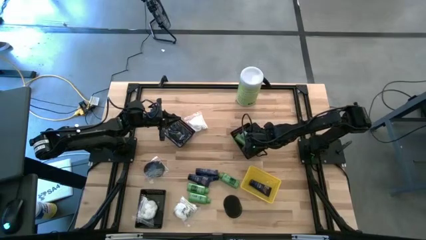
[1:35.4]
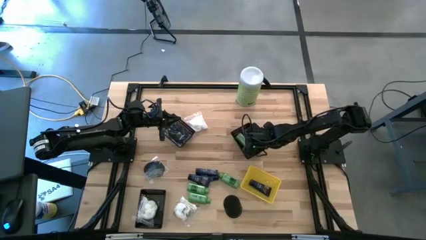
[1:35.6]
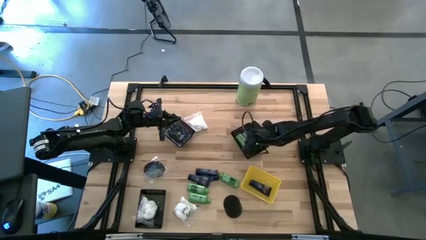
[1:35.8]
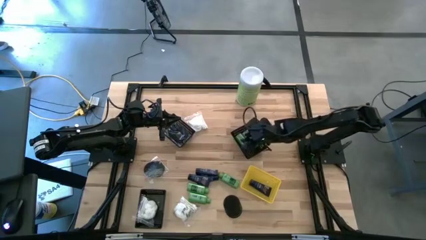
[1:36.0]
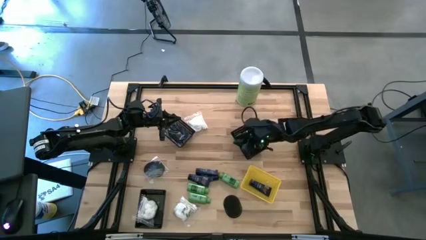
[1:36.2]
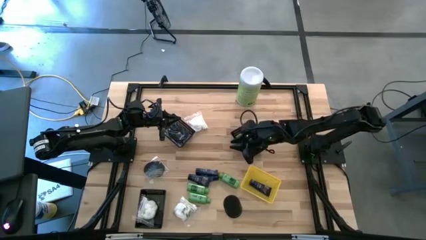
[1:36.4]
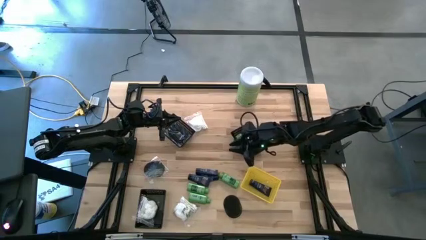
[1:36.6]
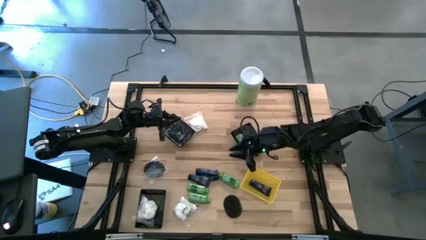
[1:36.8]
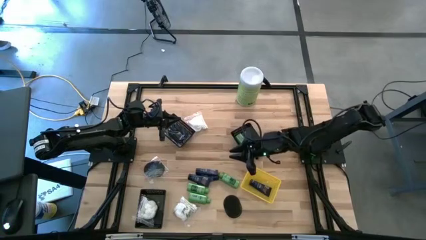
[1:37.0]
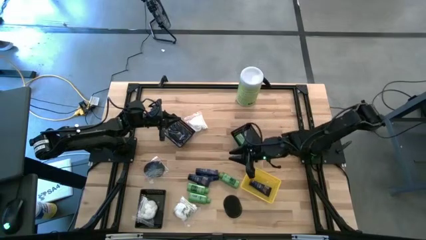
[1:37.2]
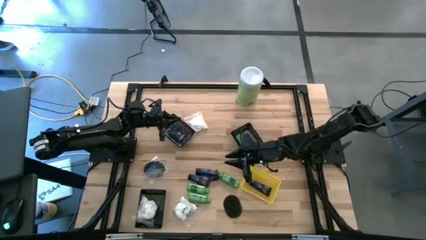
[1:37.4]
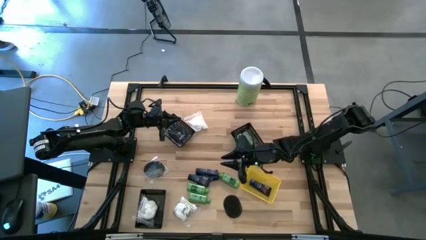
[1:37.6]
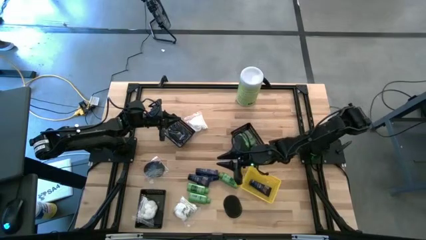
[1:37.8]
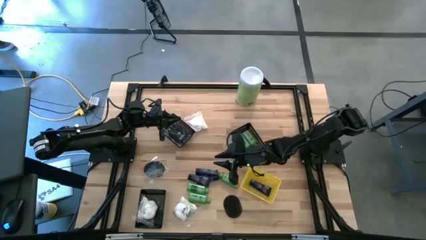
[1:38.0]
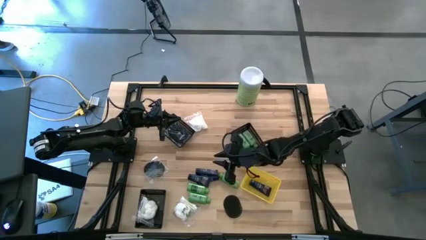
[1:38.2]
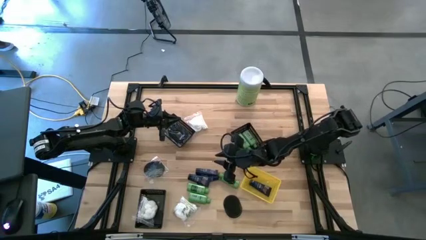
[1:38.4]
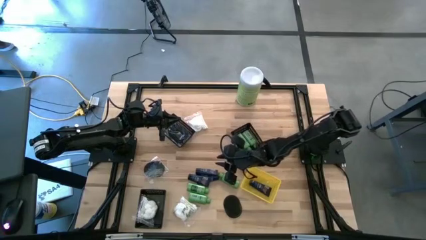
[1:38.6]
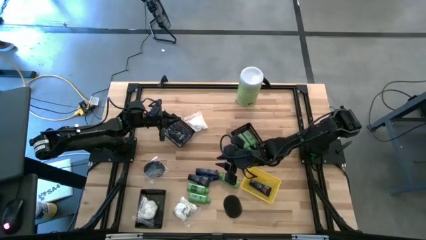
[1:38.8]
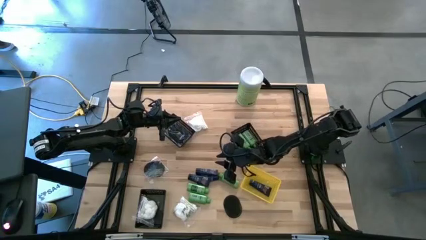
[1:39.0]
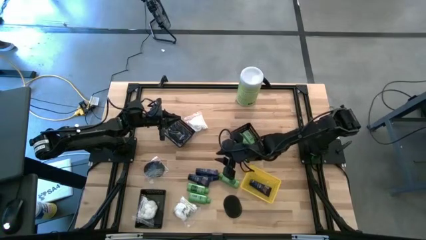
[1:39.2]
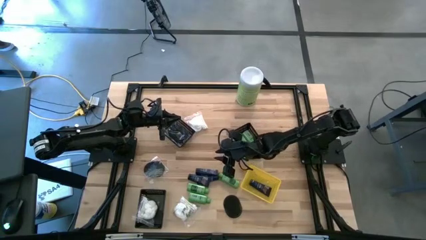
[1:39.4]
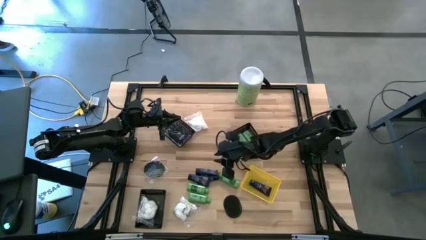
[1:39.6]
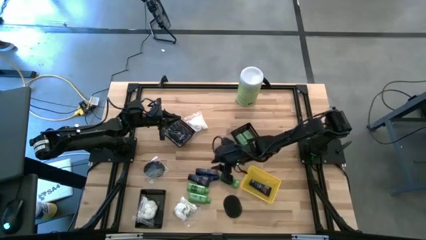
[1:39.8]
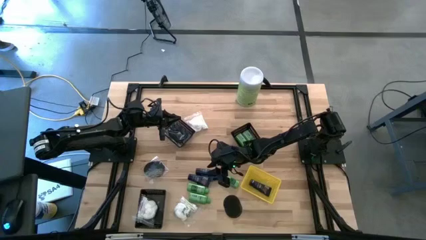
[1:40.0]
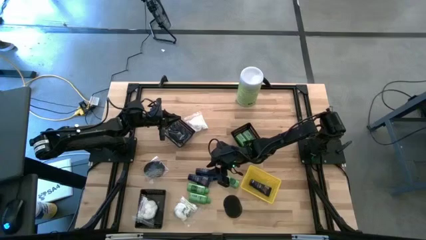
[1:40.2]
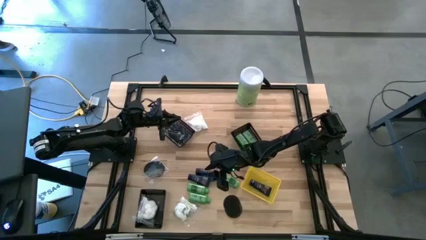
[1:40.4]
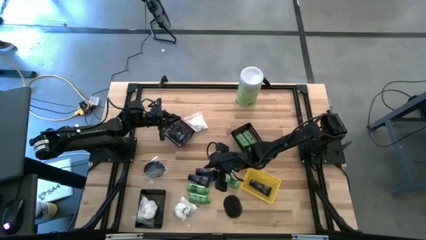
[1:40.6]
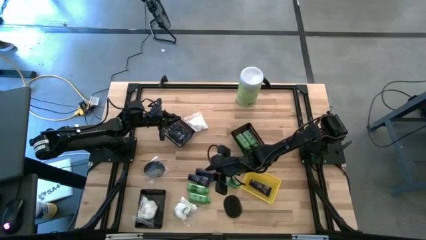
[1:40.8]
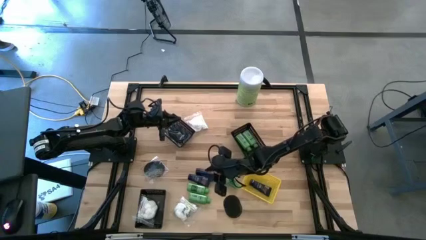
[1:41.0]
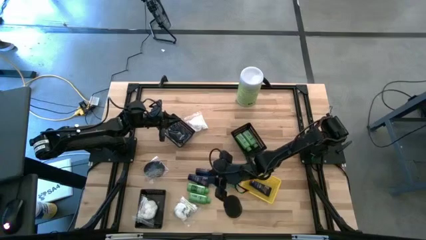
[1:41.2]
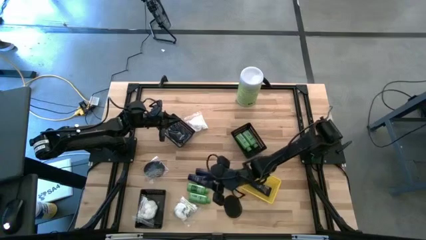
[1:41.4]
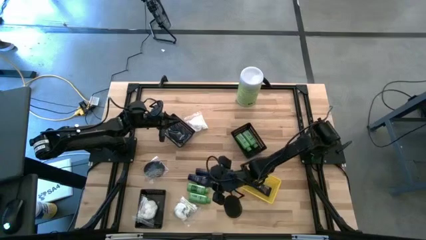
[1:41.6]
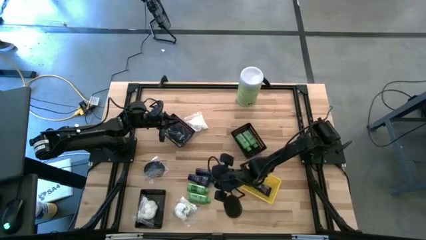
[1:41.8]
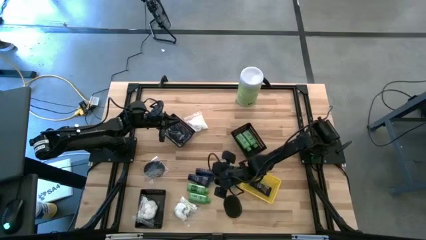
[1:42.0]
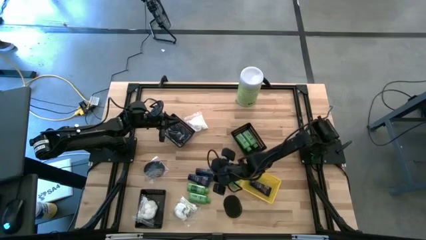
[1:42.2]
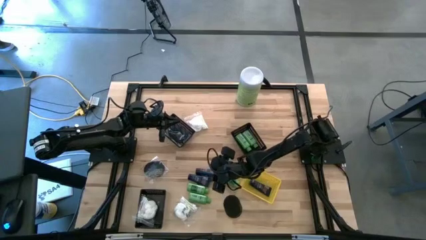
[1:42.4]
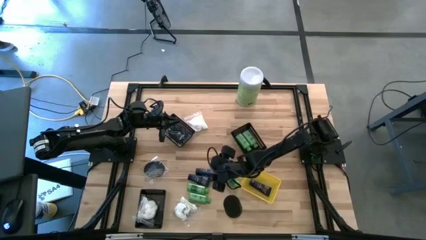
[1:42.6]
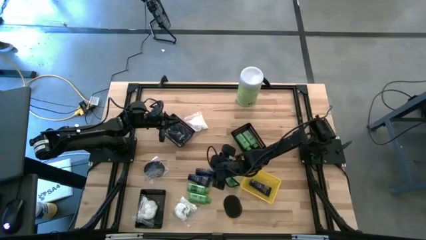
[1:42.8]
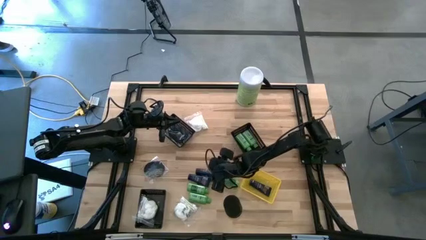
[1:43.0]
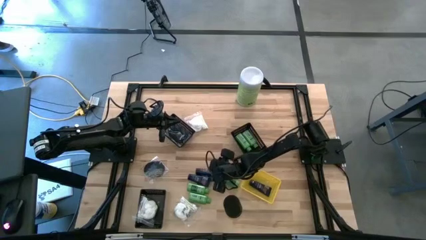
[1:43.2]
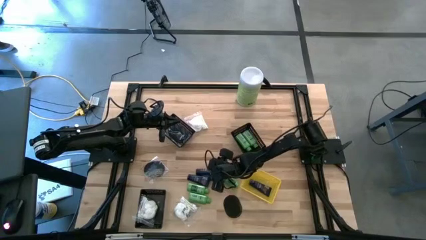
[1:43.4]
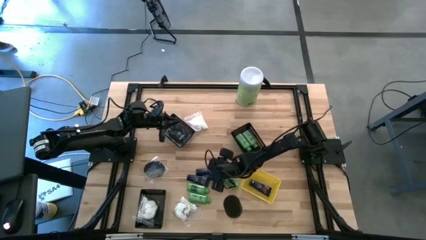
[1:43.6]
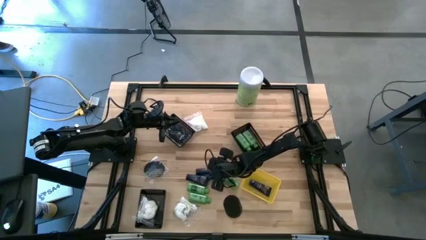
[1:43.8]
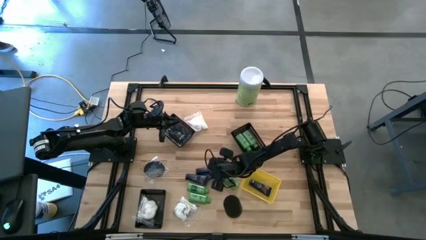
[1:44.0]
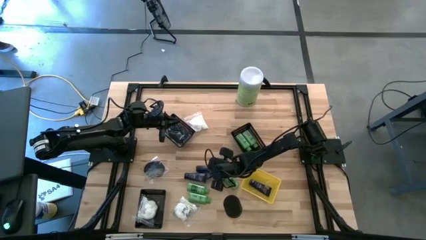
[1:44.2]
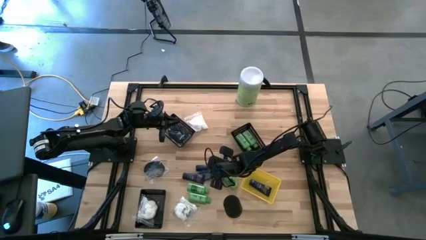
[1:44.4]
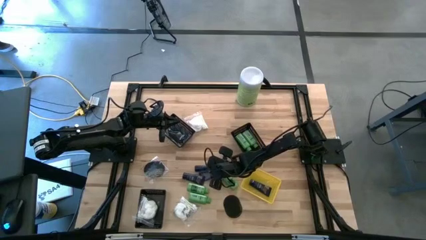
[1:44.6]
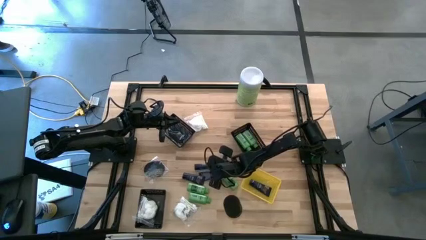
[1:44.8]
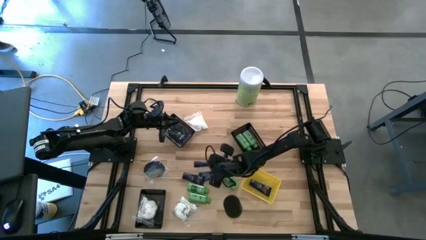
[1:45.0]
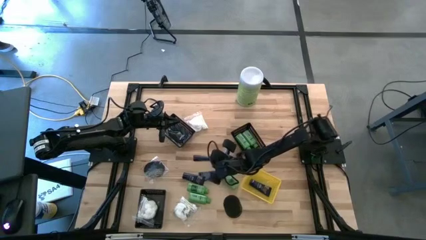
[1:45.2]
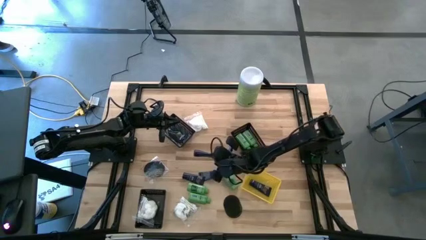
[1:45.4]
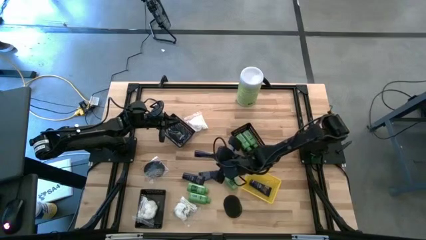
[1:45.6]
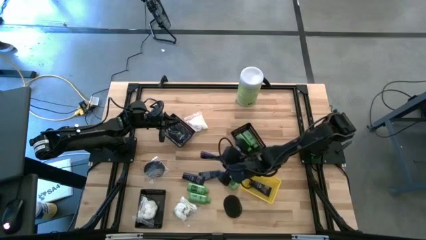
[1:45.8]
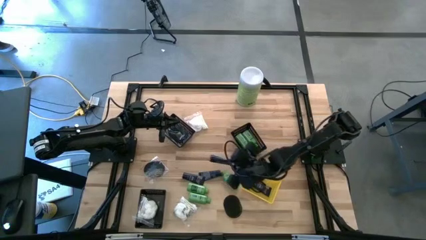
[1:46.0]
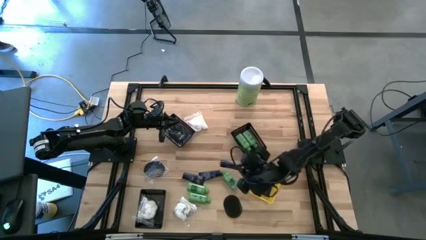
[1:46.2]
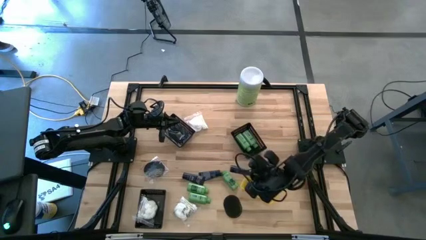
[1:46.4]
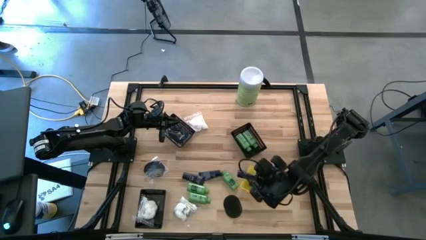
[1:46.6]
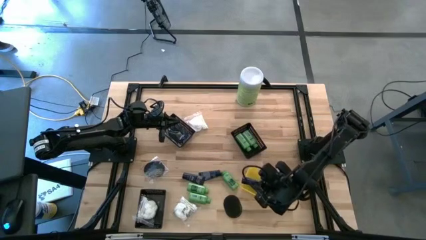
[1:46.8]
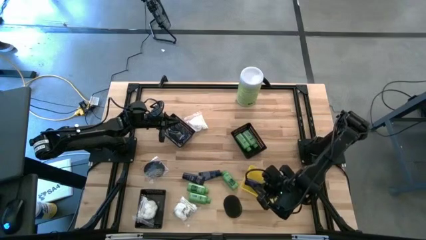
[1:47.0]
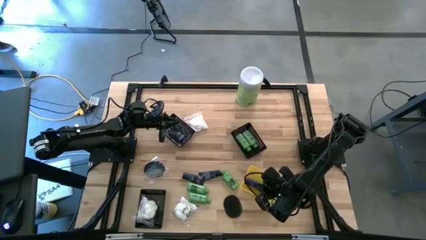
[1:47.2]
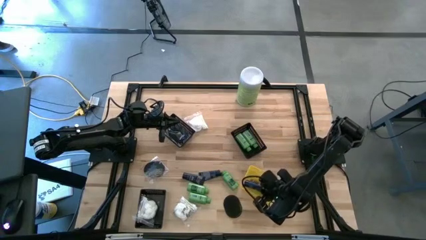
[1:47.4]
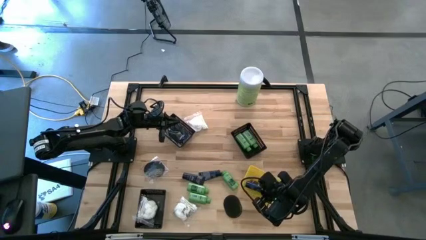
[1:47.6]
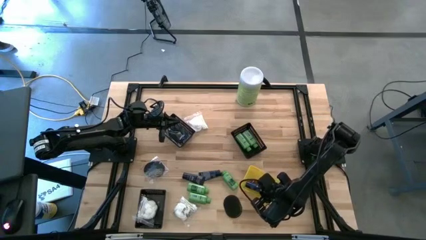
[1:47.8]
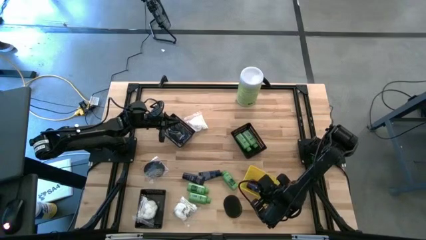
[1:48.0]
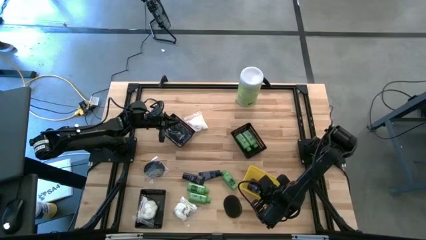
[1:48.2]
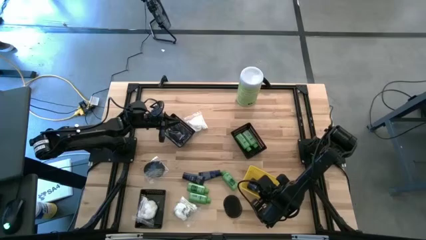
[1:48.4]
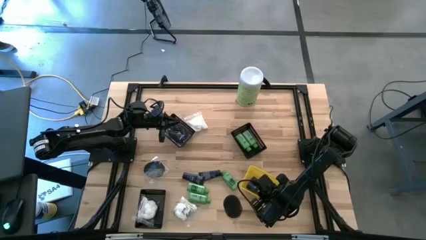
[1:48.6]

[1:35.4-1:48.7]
Task: Pick & Place Travel size toiletries
Put the shaving cream tube into the yellow bin

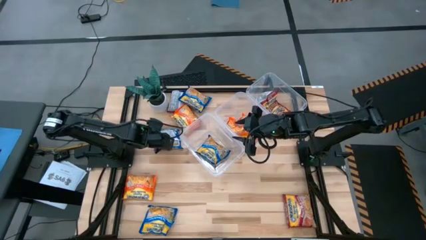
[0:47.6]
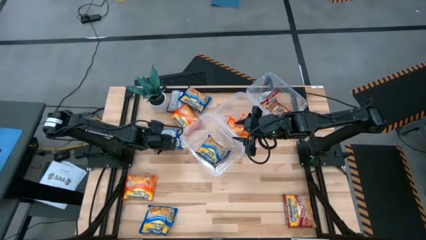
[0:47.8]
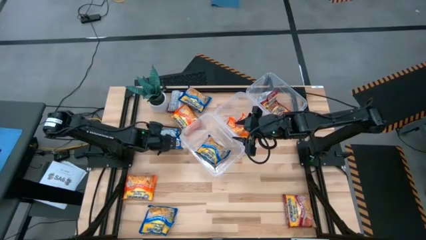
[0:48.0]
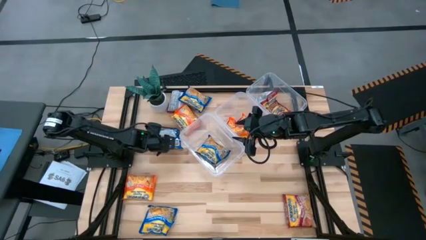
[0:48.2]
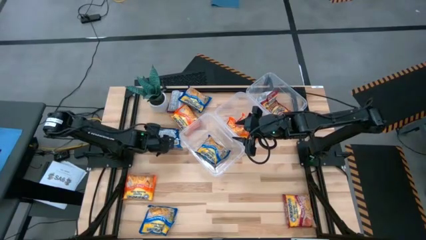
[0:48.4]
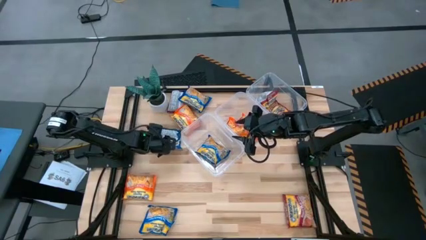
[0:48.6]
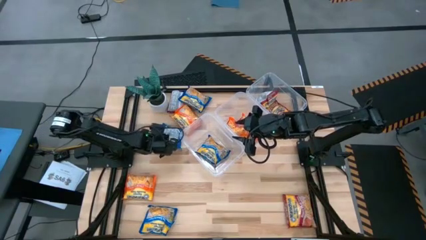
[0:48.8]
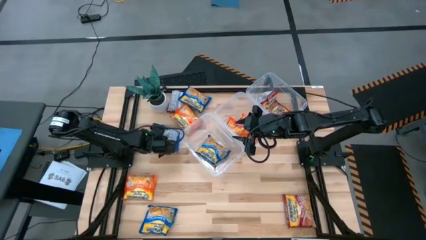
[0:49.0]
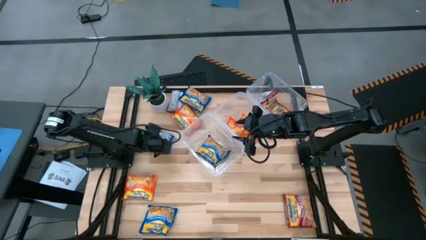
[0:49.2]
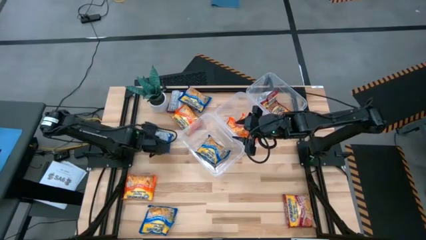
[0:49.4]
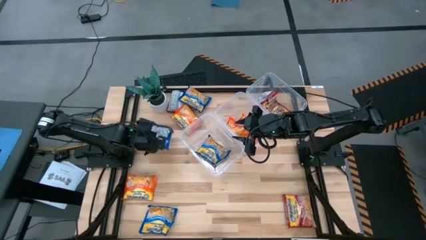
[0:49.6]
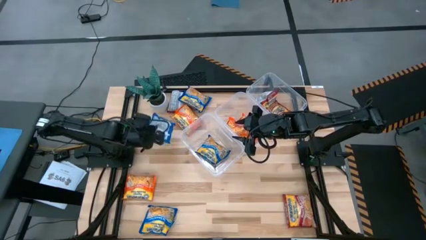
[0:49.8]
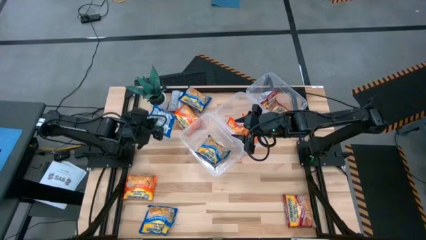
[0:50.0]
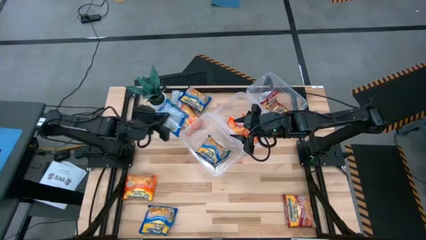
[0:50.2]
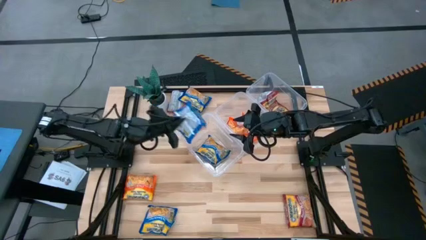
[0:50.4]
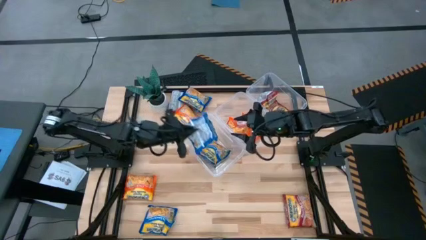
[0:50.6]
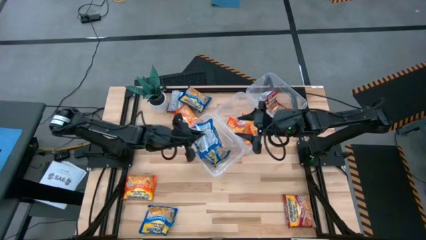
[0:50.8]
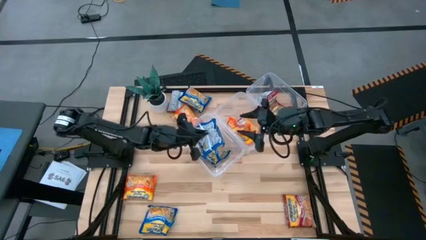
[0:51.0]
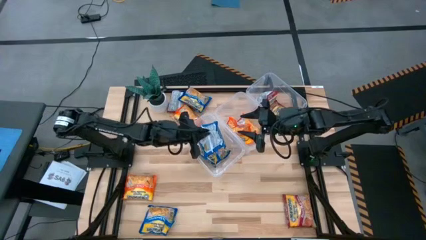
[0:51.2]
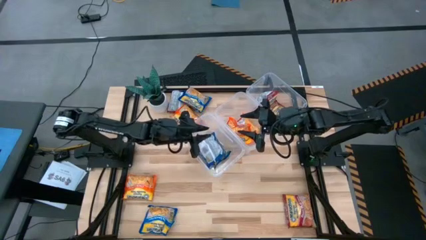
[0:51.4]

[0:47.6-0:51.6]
Task: Sort Maruchan noodles
Put the blue noodle pack into the left transparent bin
